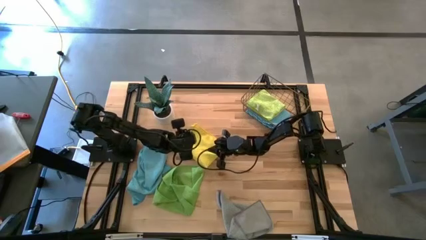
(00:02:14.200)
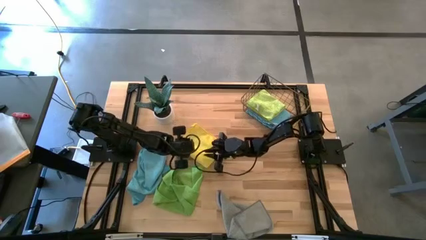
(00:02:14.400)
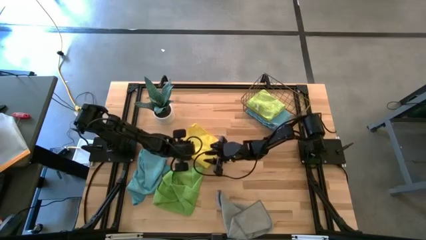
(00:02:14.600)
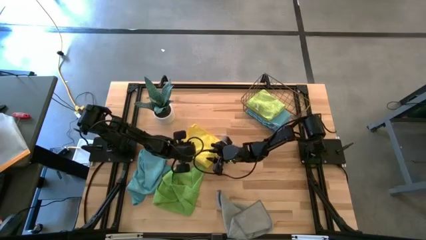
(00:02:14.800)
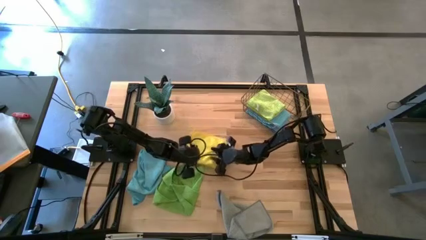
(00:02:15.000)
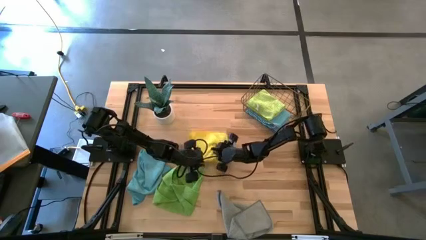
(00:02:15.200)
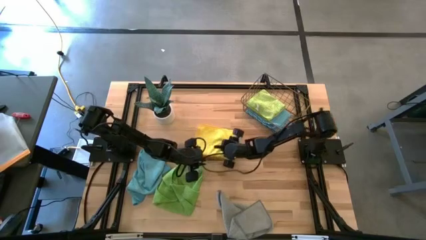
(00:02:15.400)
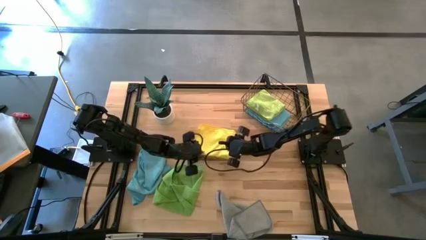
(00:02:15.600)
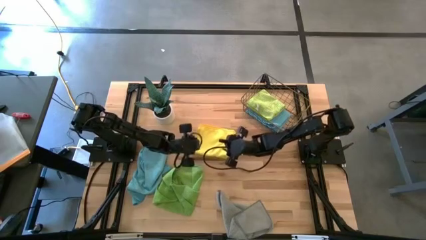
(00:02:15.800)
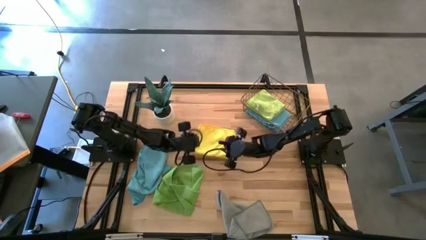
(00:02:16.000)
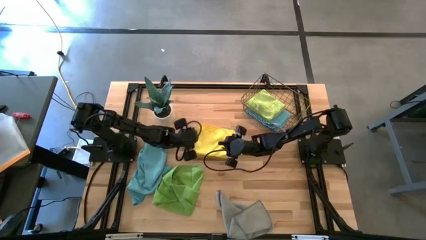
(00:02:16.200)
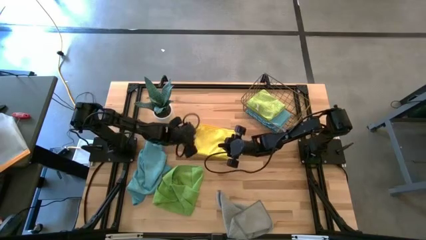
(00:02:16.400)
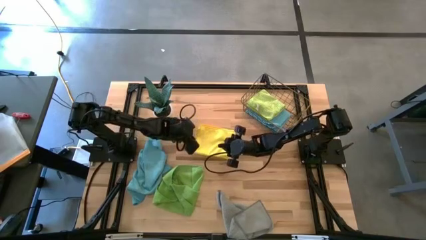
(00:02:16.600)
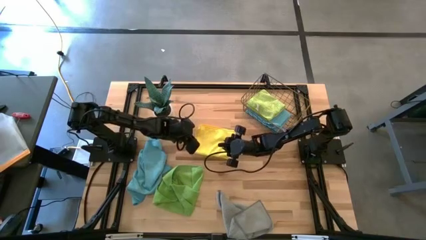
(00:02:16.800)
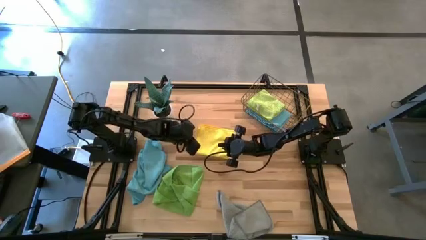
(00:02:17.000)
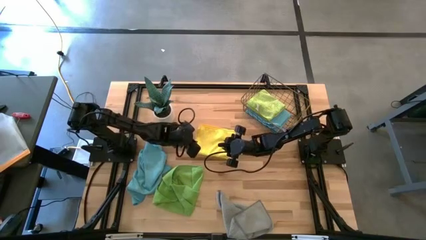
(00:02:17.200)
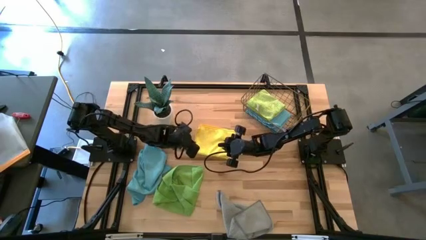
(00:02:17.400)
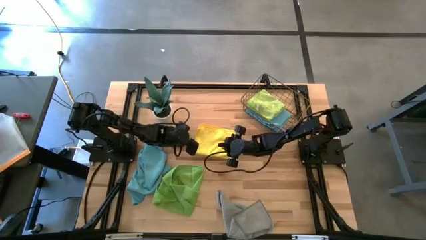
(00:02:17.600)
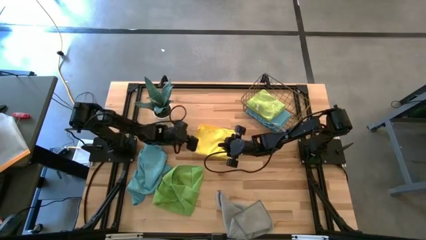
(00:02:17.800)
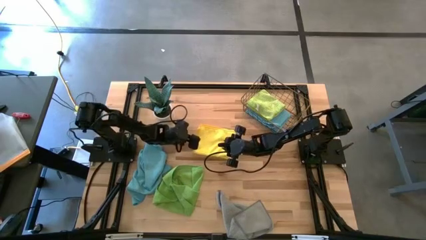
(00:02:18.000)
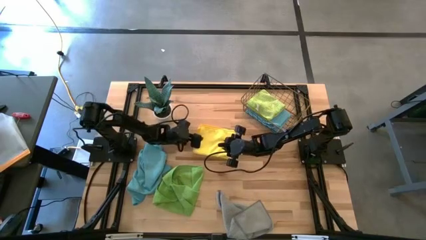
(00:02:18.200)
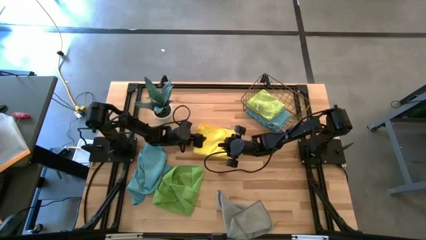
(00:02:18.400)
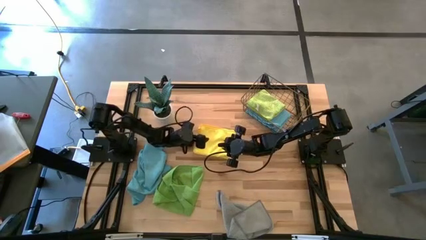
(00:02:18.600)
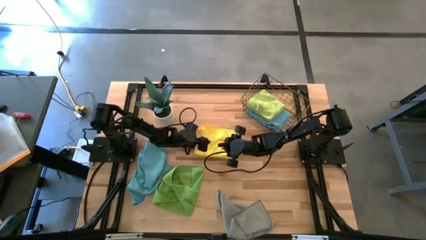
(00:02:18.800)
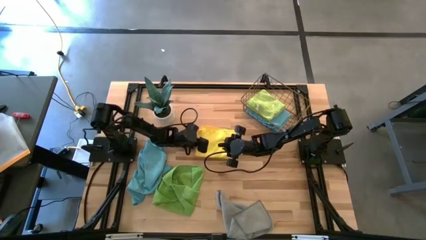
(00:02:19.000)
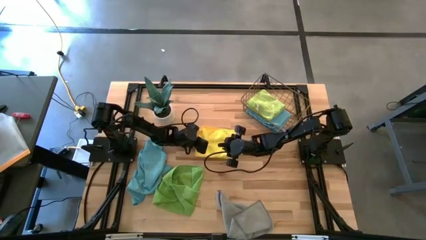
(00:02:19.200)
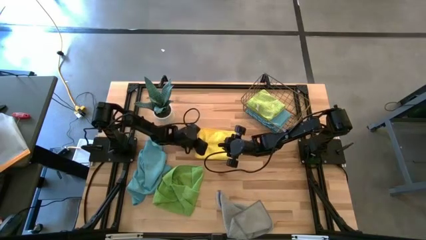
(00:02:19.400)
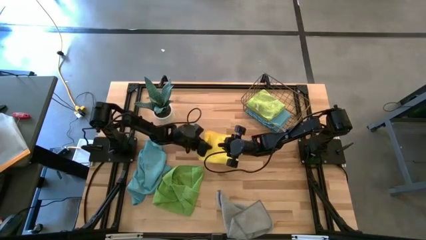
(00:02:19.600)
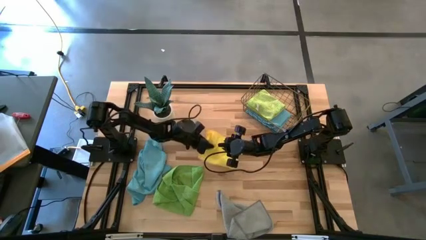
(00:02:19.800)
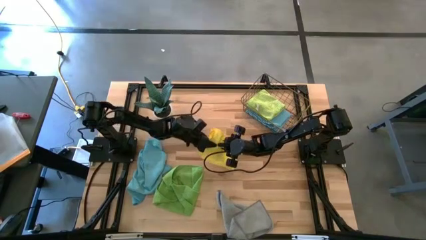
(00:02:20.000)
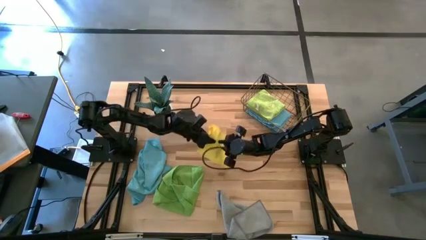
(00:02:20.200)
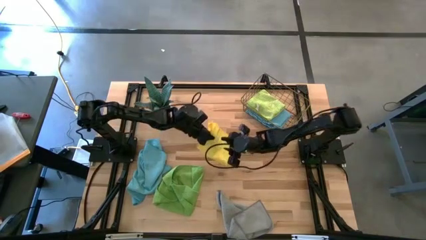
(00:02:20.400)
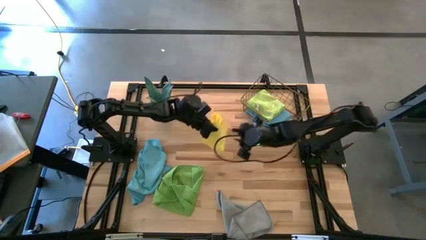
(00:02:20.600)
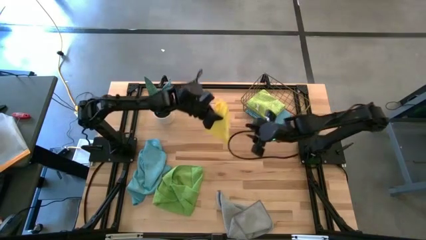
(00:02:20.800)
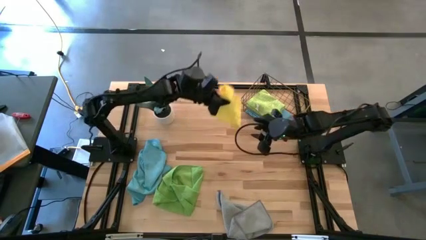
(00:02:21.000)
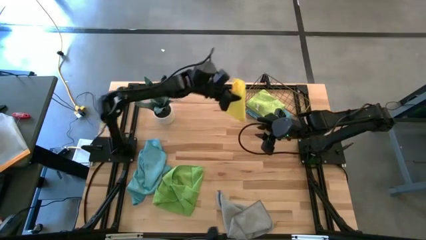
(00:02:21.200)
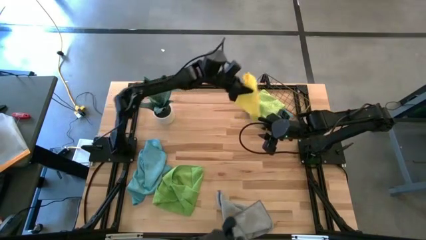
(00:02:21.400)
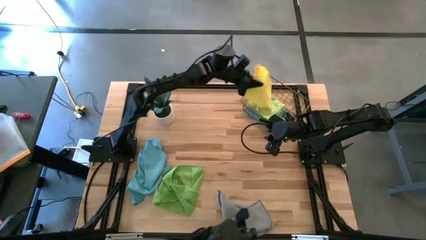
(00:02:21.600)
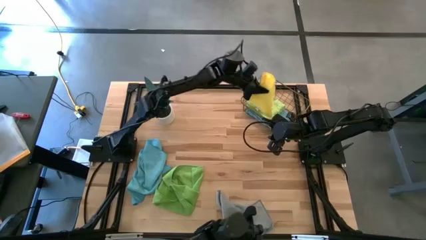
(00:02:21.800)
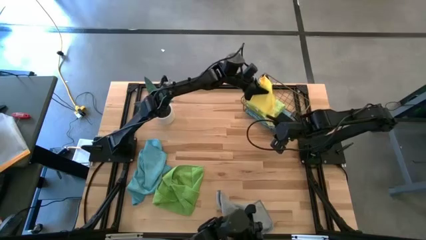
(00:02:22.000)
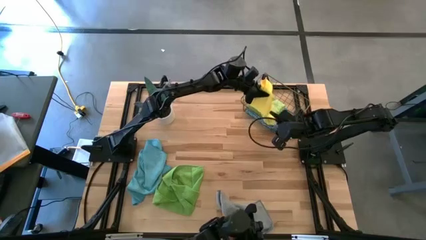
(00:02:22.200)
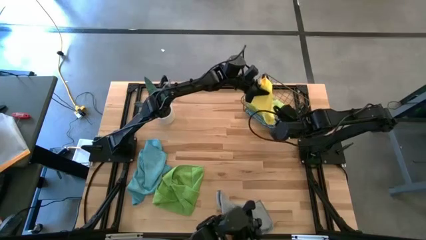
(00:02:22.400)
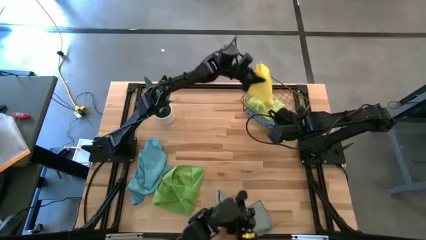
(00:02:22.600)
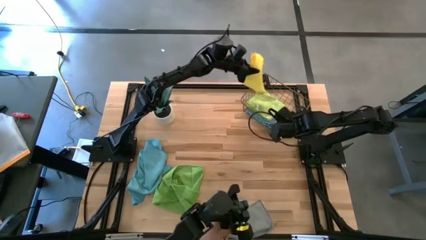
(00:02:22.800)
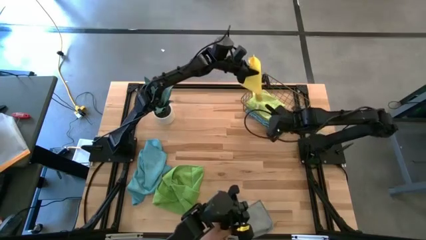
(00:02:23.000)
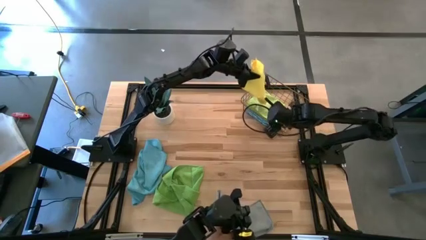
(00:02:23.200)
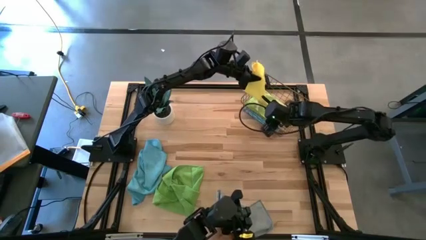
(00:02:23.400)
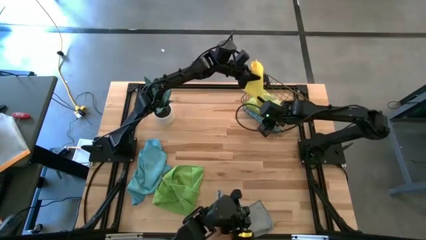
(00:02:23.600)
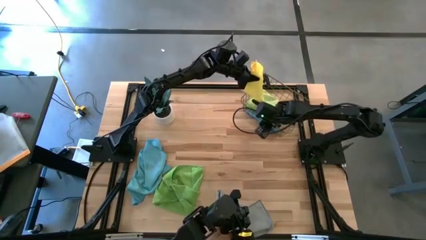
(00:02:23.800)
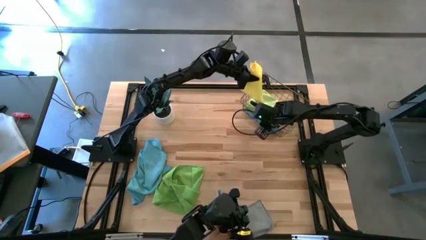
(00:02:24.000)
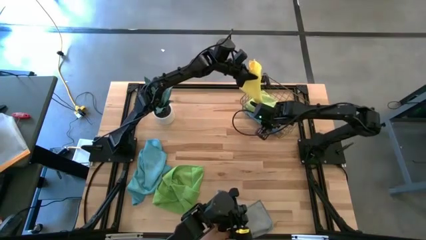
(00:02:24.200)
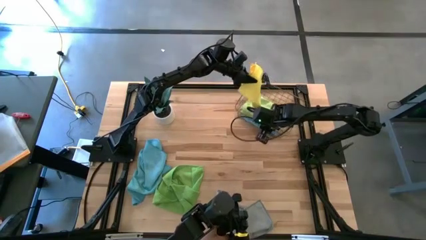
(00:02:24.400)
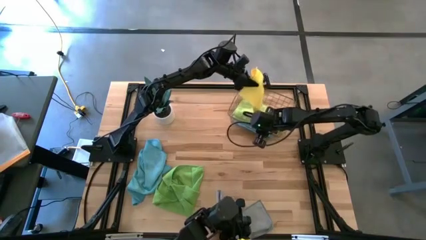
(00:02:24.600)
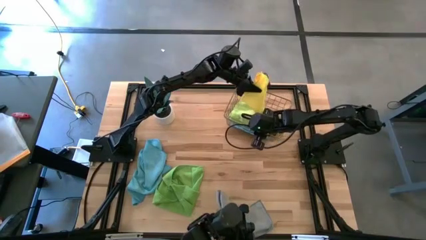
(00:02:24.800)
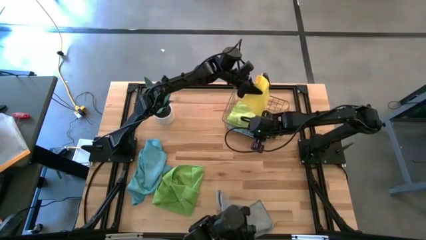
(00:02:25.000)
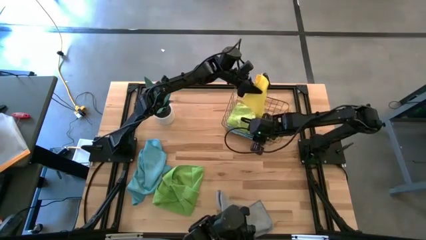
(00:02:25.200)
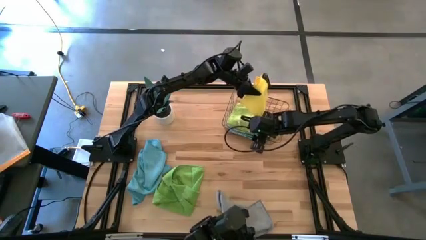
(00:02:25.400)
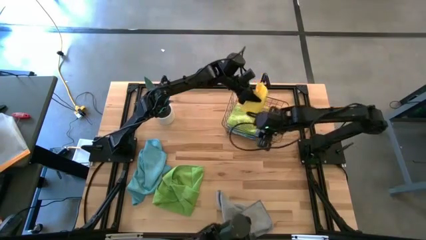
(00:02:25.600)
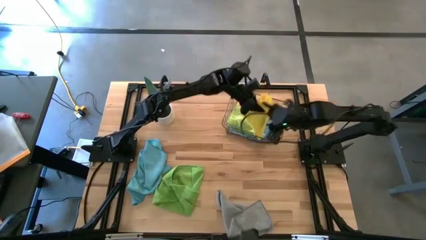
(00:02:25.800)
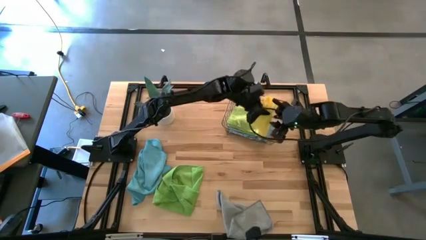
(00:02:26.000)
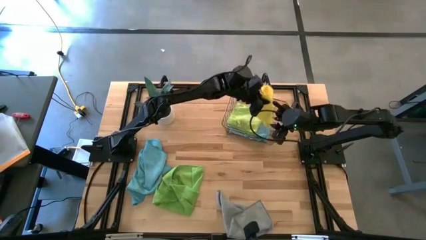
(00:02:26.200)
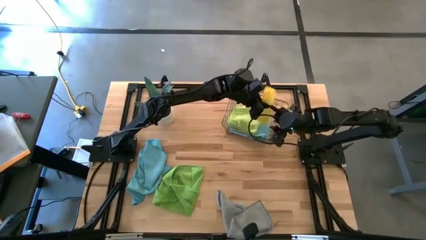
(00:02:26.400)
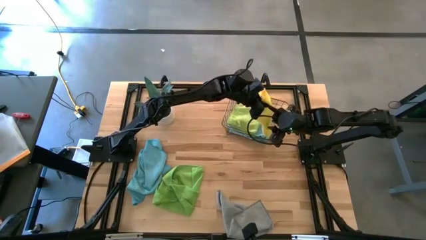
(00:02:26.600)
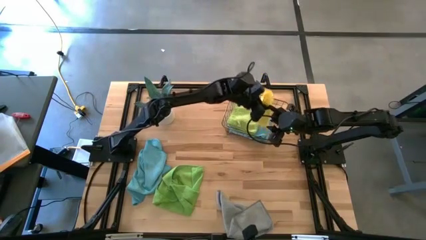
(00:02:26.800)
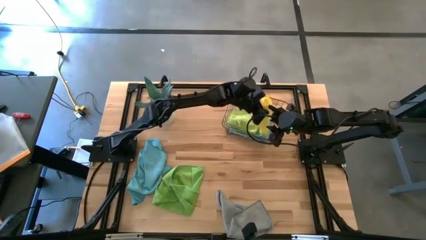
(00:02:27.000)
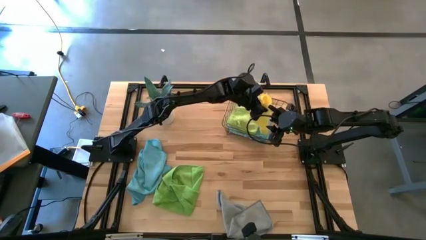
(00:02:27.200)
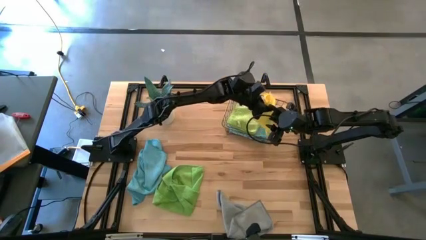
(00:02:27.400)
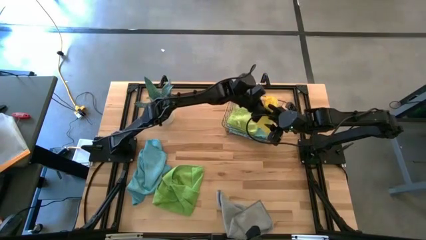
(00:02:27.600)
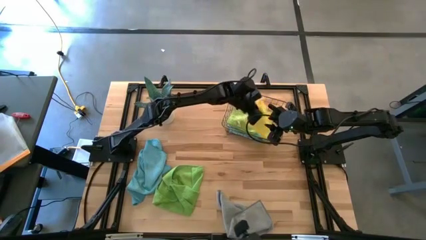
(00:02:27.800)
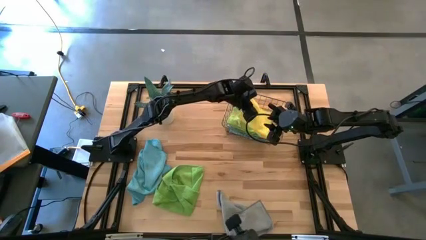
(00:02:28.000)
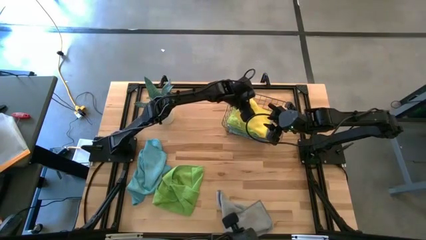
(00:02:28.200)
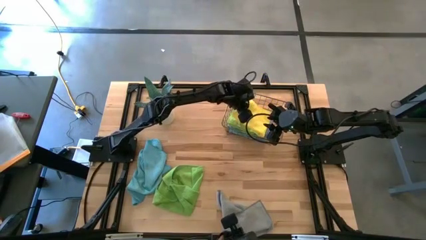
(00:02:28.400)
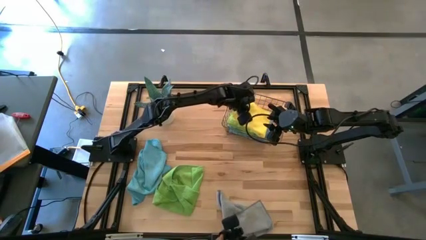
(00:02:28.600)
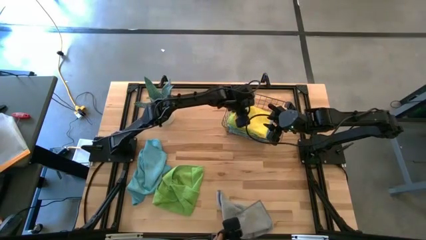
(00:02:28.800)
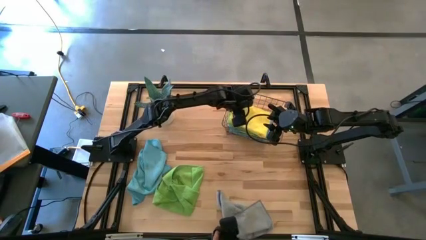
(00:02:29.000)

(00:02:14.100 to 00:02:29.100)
Task: Fold microfiber towels
Put the yellow towel into the wire basket
